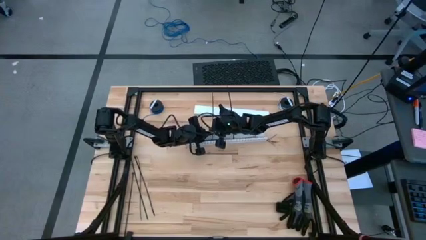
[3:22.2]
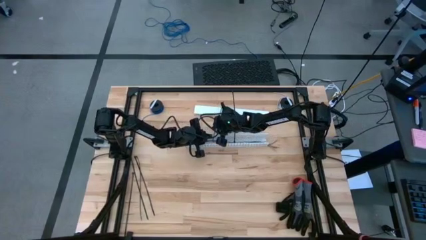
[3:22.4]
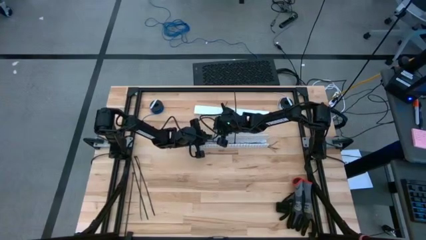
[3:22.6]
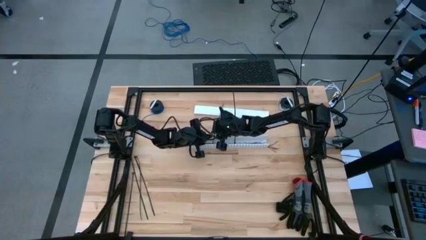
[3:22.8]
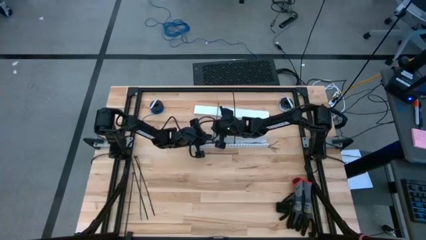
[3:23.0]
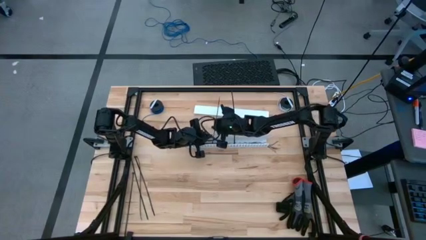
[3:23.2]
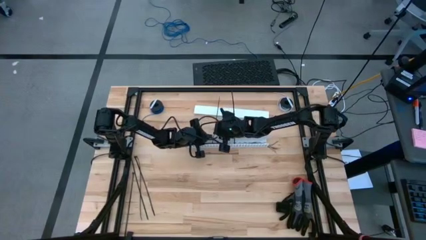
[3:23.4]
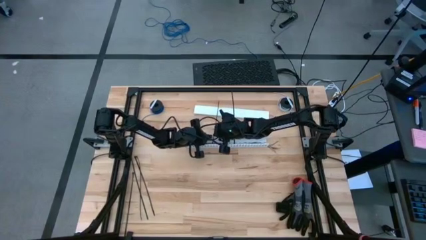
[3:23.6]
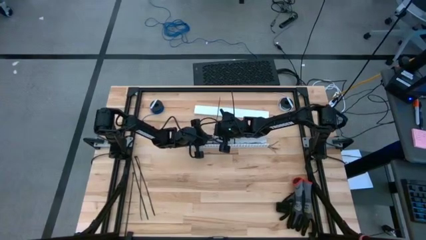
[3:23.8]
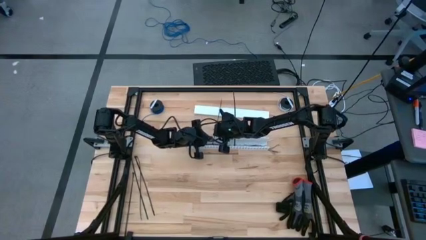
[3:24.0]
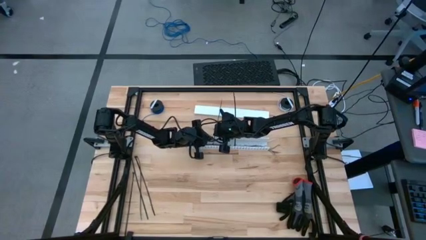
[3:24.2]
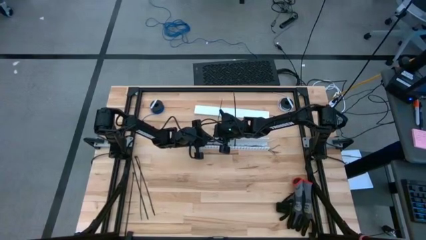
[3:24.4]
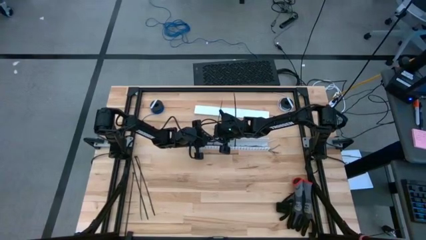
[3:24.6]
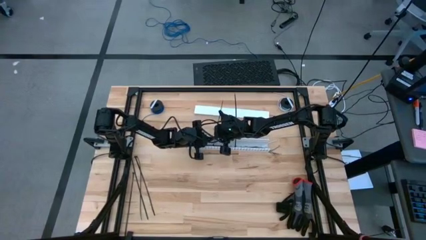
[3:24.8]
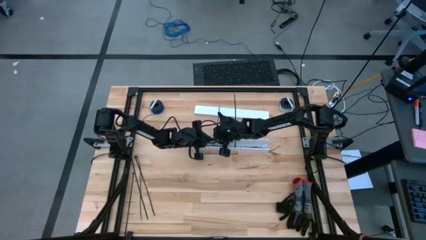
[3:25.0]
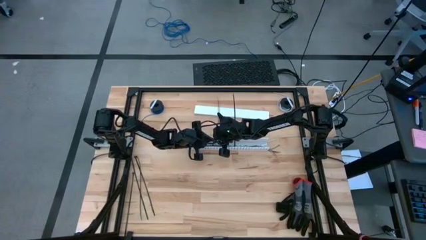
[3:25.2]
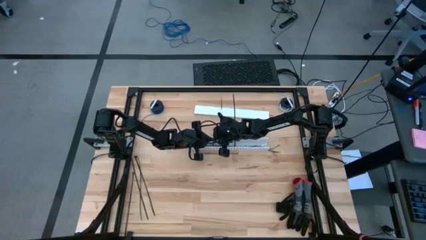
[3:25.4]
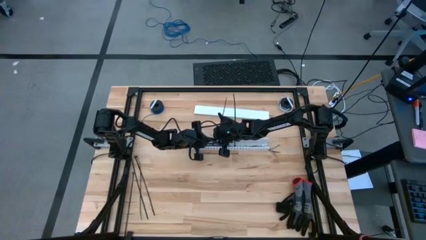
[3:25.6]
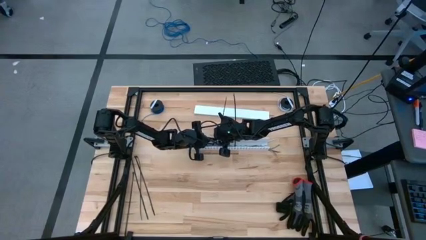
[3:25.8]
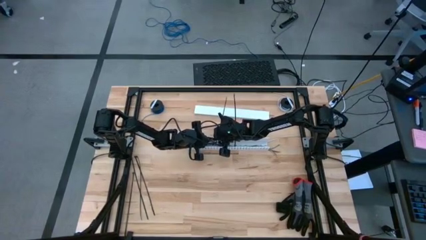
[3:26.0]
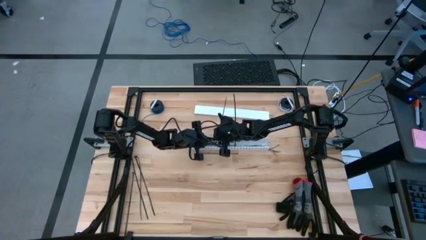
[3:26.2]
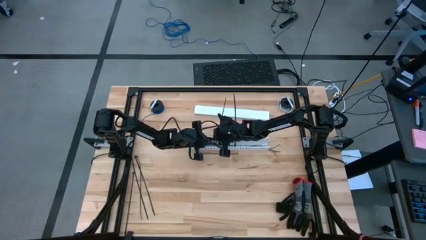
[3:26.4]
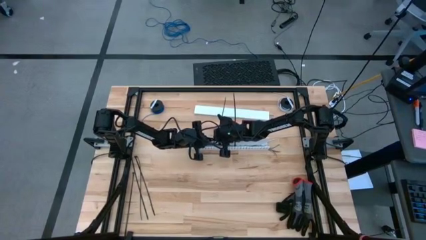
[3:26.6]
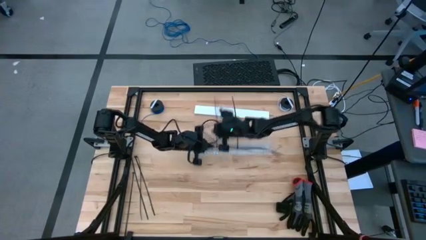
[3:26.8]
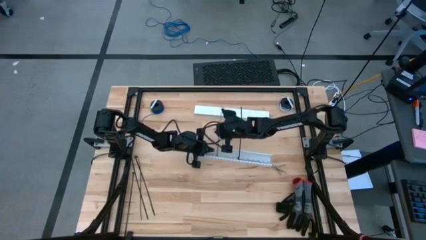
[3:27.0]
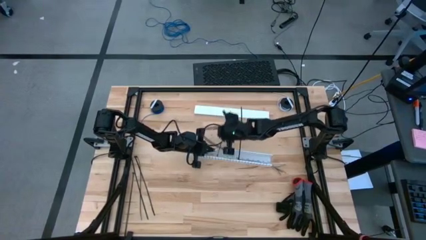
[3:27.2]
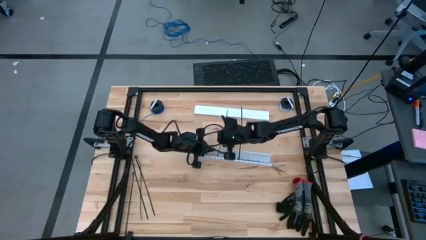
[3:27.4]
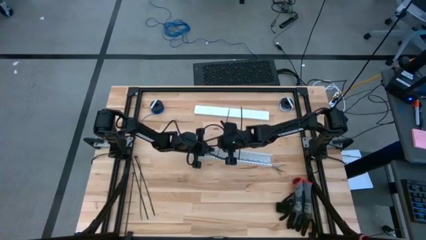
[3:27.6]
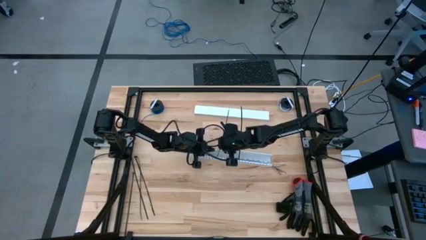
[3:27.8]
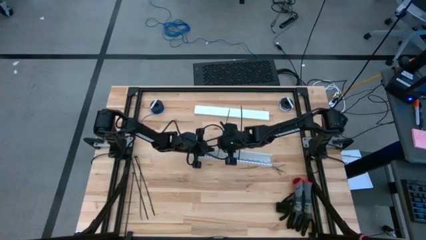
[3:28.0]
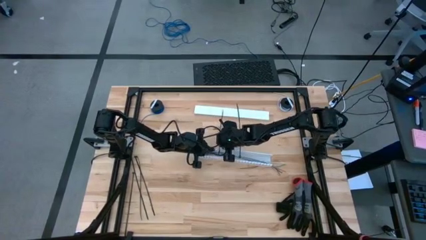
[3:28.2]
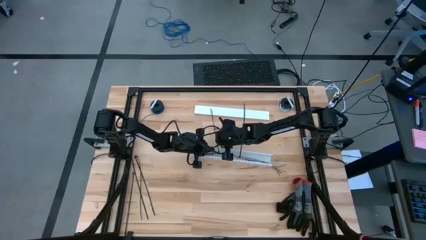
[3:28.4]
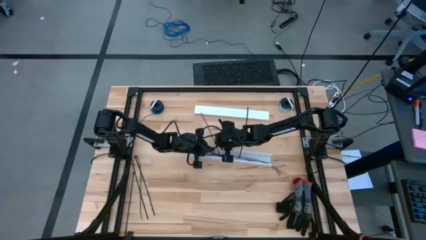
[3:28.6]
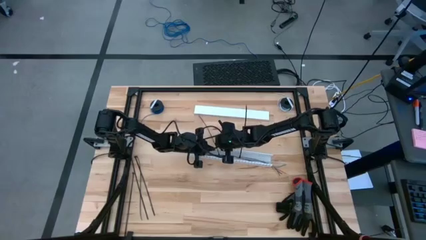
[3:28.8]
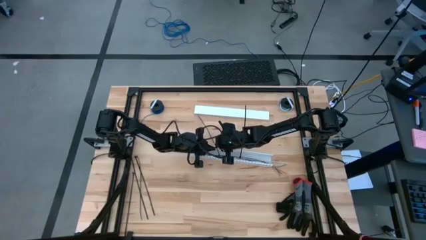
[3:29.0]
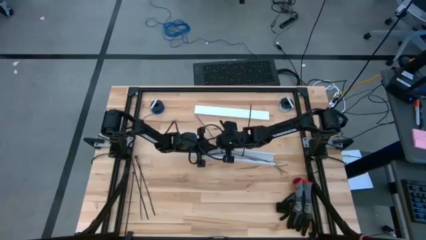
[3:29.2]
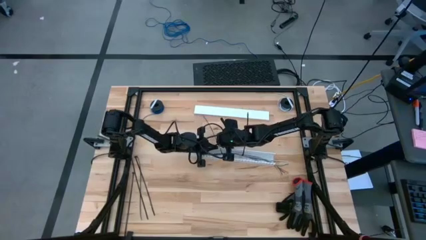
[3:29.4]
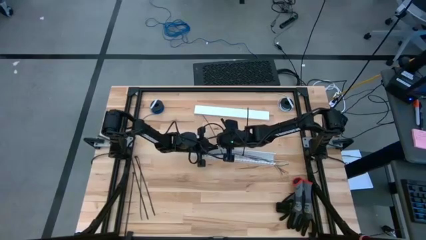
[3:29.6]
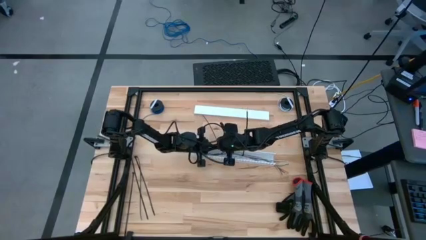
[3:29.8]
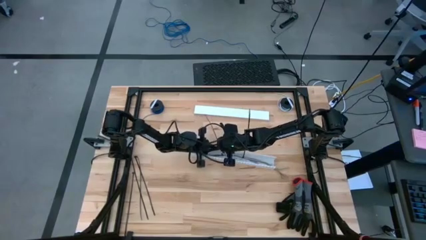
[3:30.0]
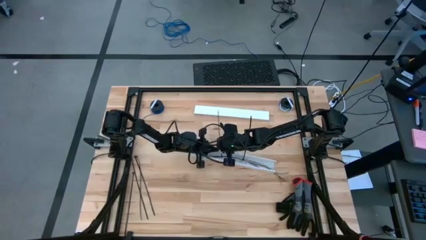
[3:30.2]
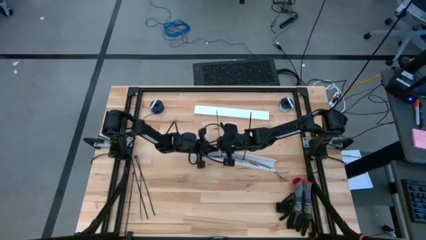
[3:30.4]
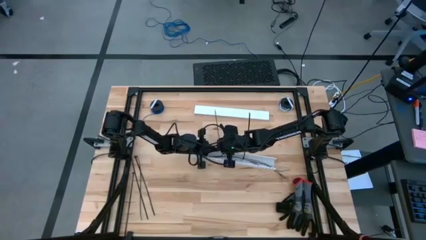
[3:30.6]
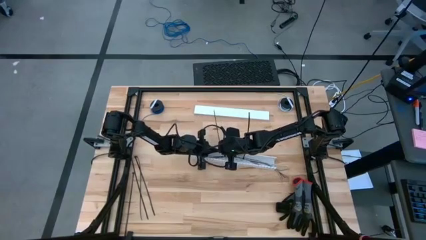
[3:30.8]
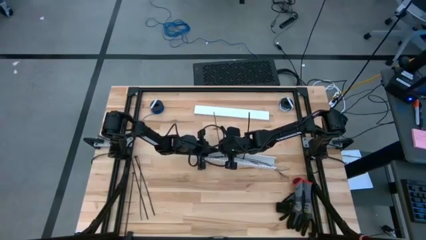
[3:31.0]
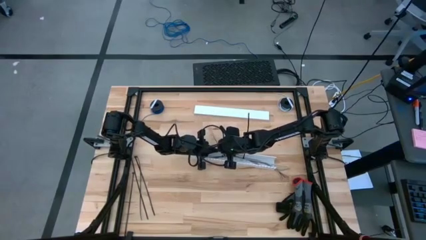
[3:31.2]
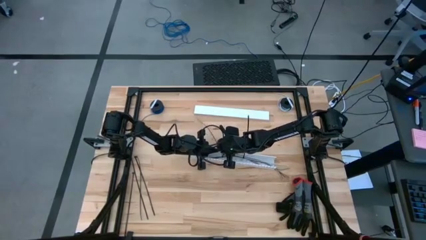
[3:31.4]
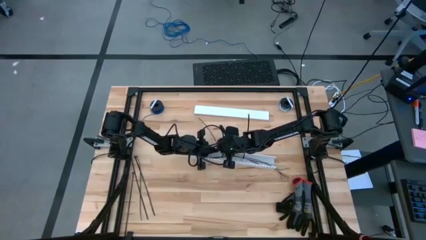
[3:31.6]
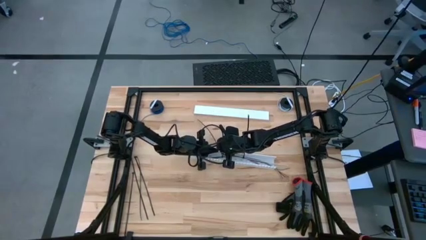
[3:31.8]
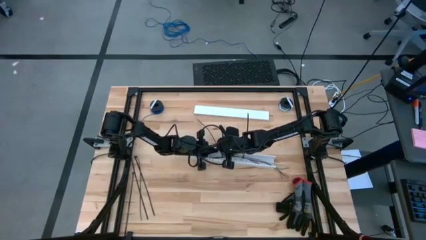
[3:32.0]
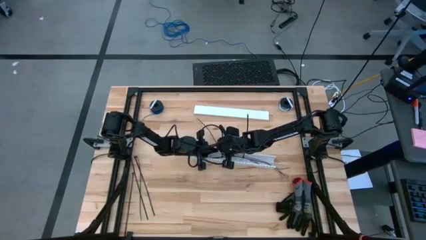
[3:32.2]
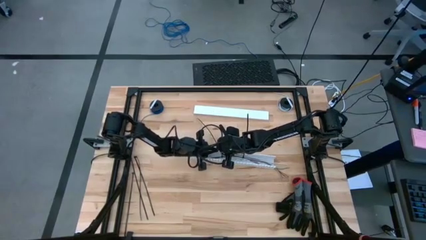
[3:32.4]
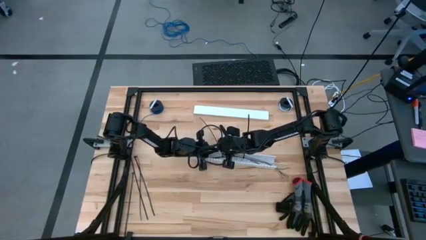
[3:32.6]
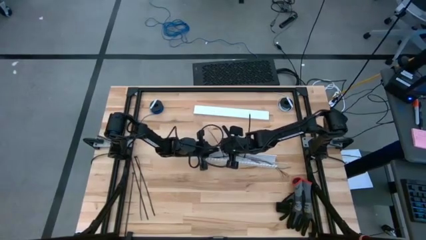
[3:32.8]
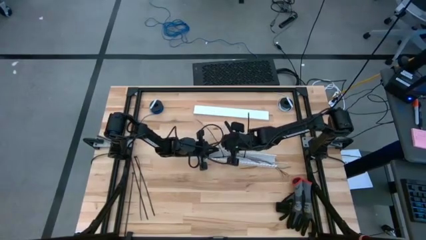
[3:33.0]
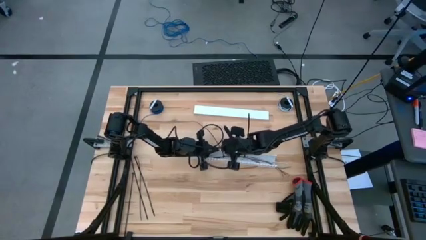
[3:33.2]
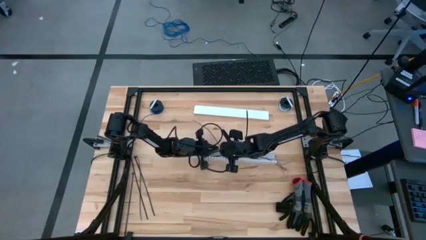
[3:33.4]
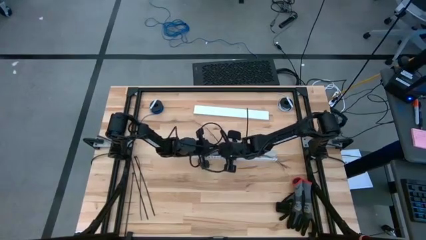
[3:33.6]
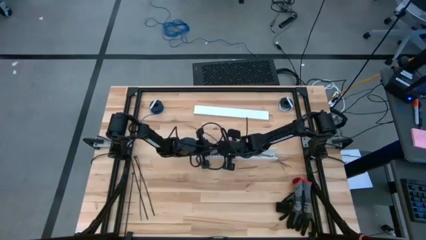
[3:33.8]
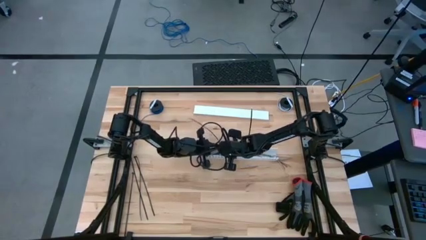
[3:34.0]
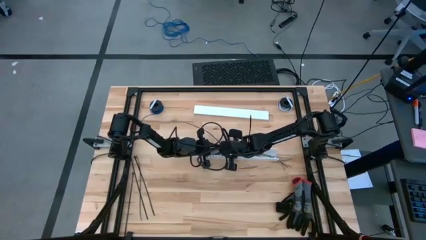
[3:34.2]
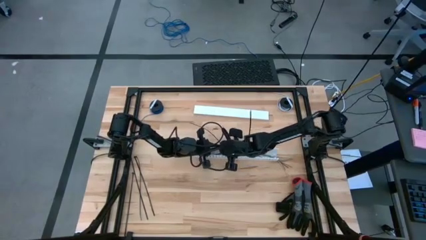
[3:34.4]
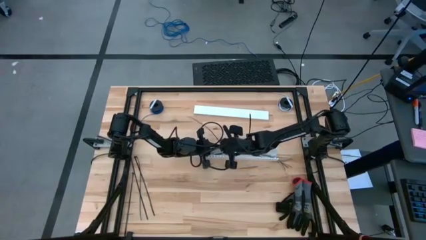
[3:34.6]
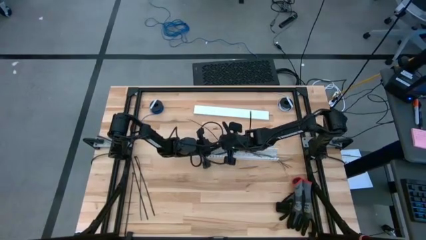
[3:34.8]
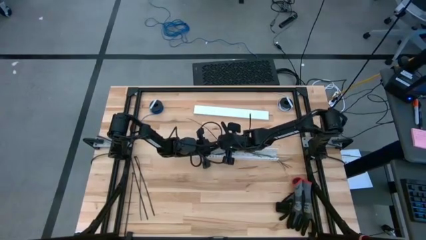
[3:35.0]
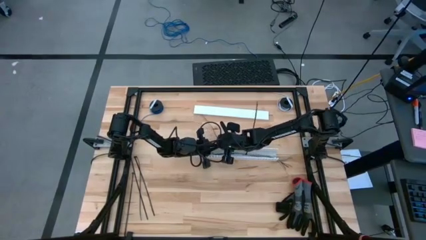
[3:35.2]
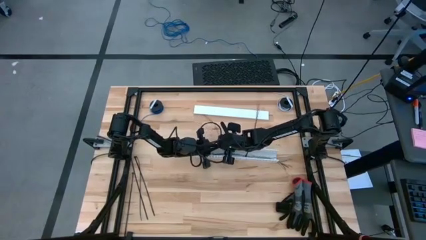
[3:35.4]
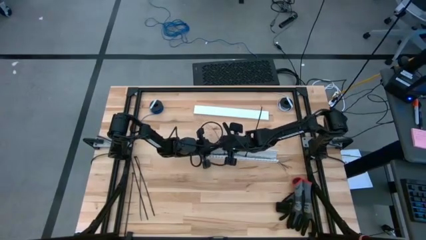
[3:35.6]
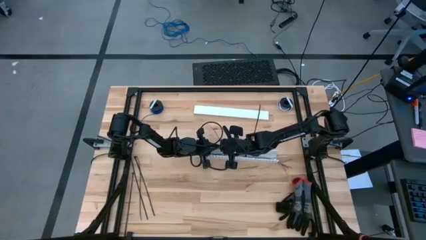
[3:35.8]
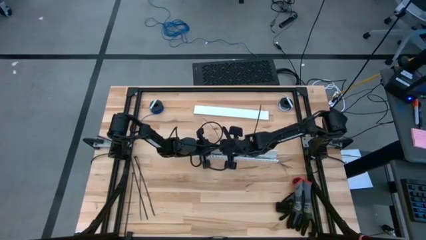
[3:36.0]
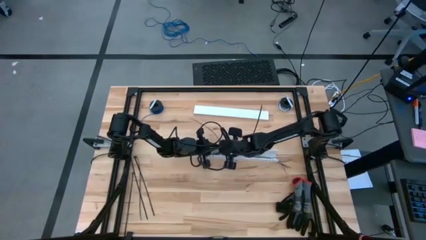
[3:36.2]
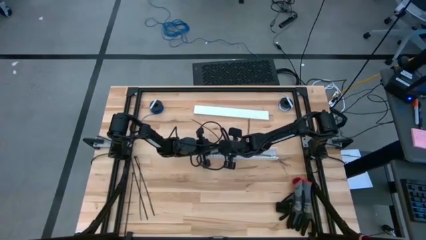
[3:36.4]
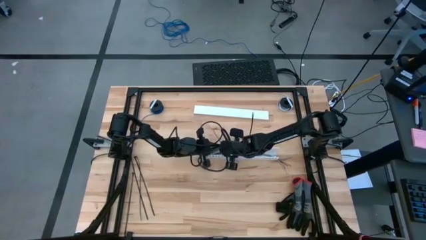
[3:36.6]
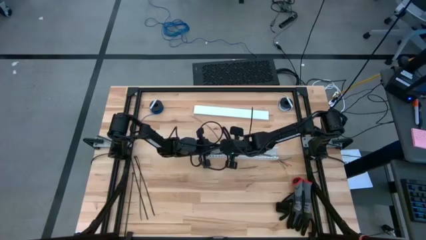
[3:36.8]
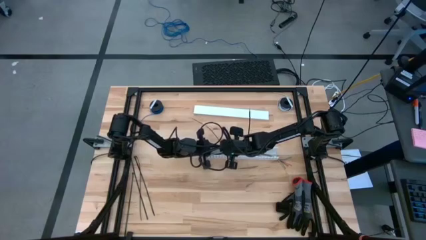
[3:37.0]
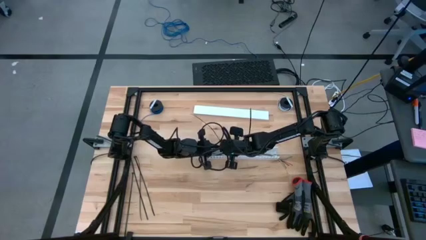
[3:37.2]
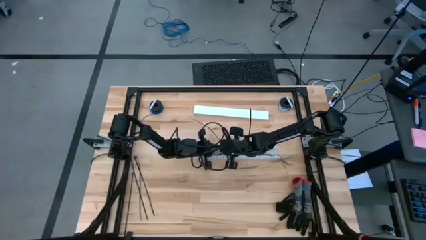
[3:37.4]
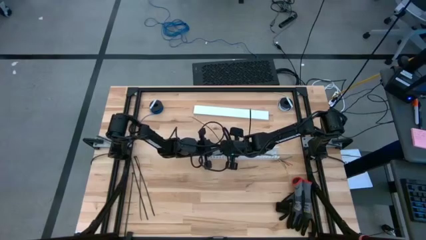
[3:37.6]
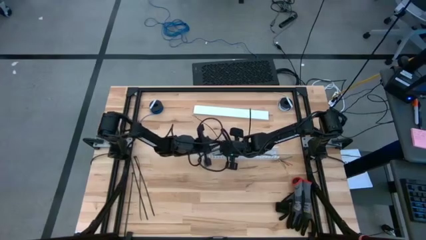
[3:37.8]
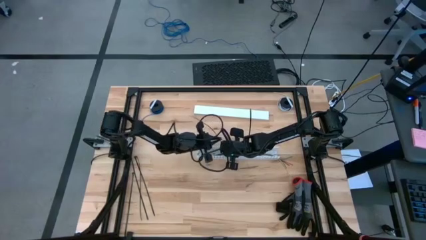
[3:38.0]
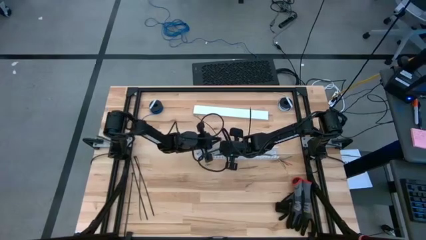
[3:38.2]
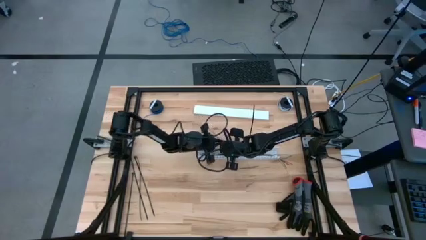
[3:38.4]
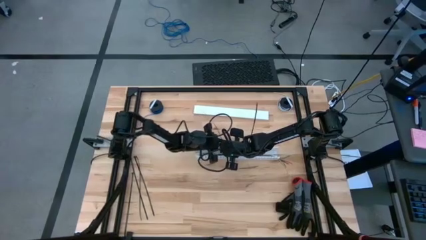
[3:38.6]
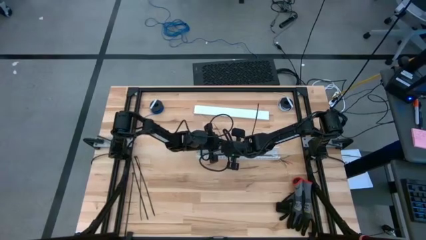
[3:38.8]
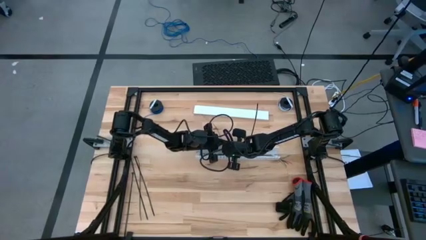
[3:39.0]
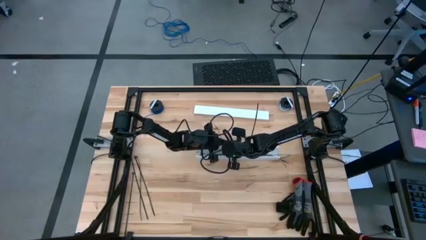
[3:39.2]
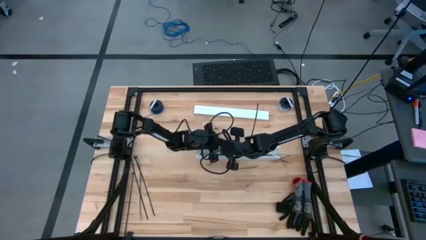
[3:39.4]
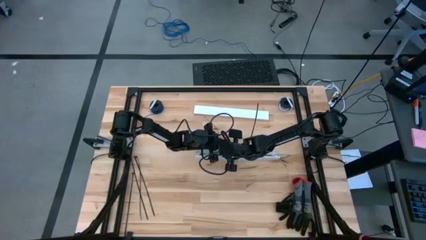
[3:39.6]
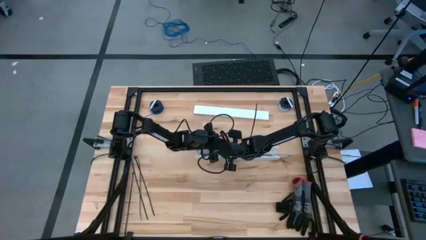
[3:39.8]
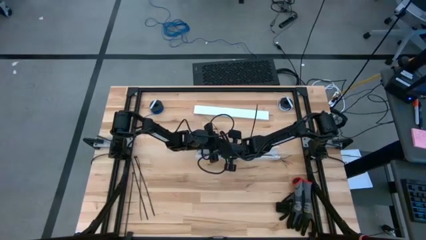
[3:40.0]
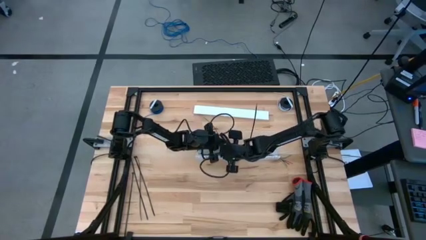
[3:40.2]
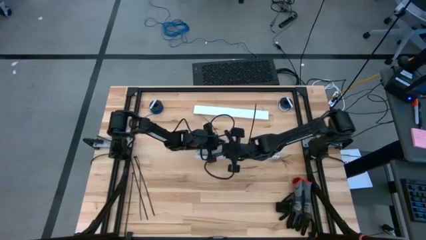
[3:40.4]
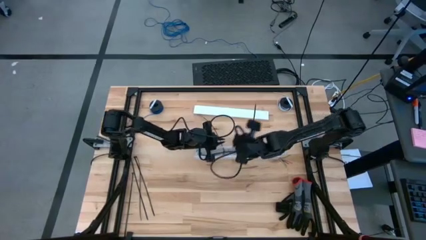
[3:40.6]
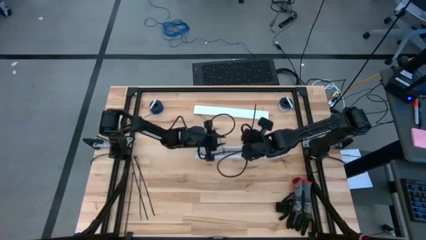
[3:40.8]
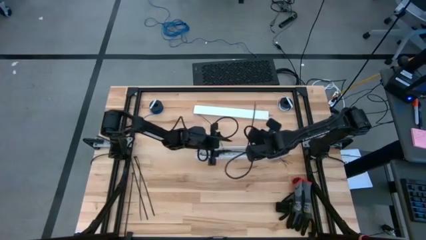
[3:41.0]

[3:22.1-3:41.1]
Task: Ziptie cables
Put the colored ziptied cables into the white cable duct
